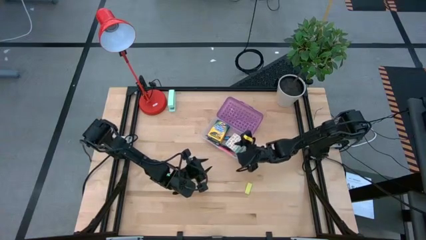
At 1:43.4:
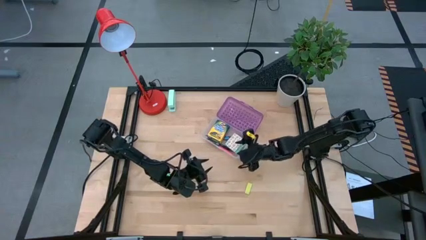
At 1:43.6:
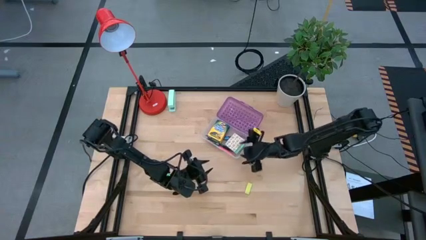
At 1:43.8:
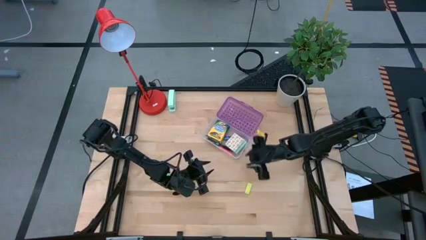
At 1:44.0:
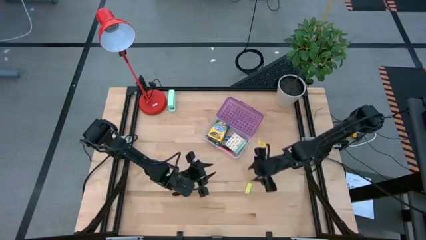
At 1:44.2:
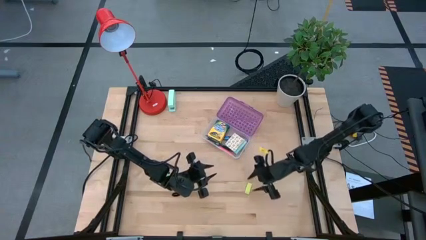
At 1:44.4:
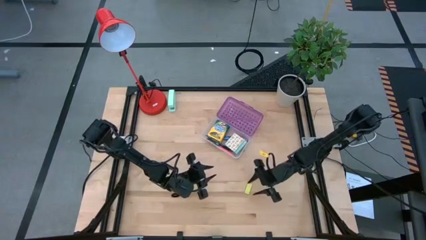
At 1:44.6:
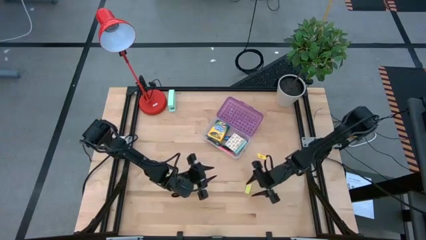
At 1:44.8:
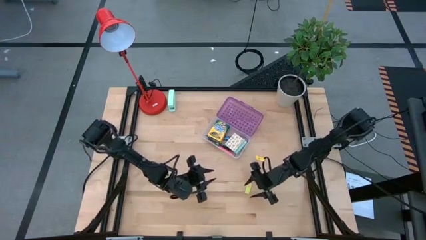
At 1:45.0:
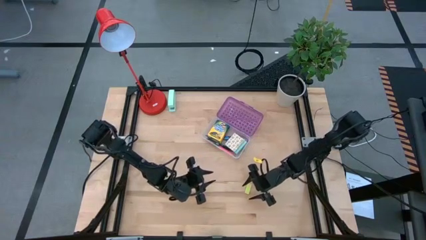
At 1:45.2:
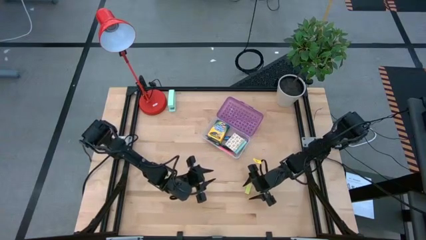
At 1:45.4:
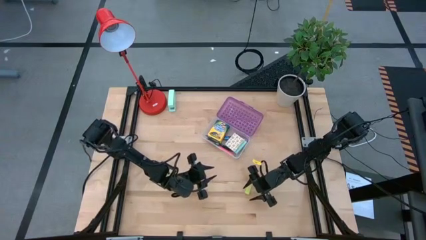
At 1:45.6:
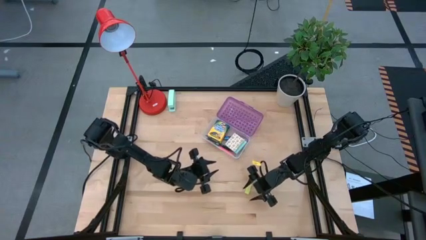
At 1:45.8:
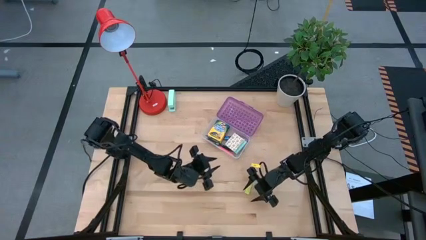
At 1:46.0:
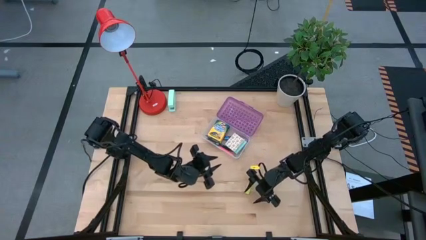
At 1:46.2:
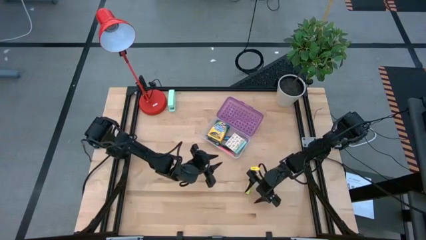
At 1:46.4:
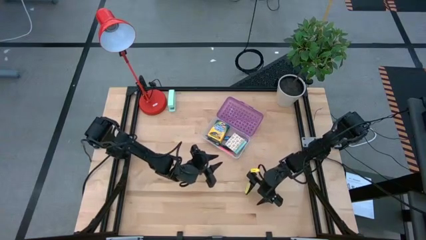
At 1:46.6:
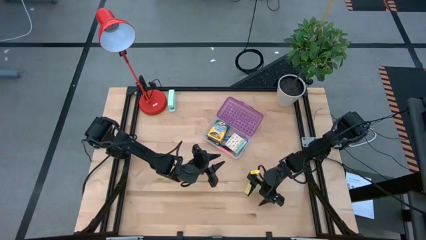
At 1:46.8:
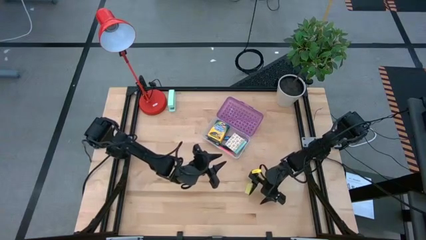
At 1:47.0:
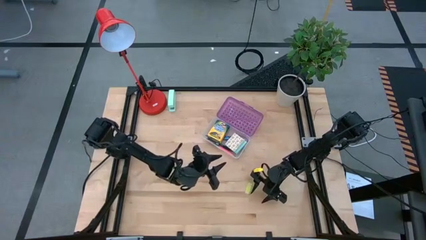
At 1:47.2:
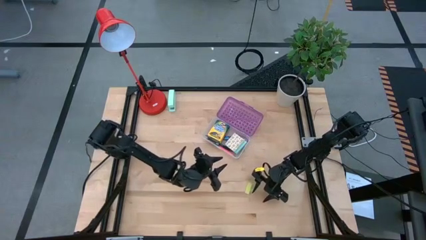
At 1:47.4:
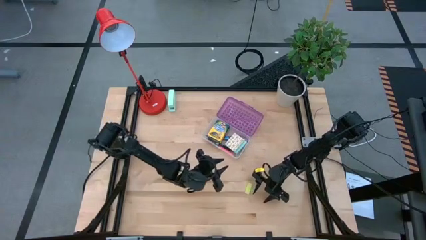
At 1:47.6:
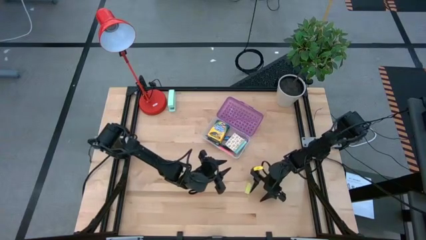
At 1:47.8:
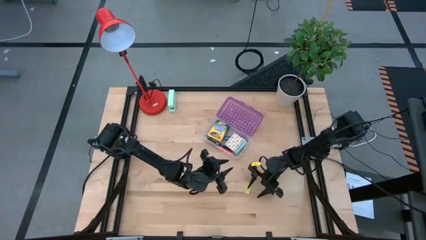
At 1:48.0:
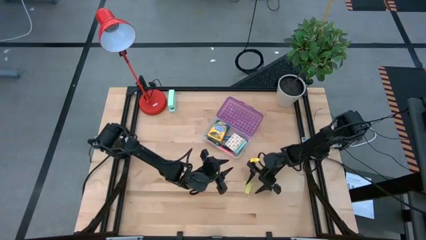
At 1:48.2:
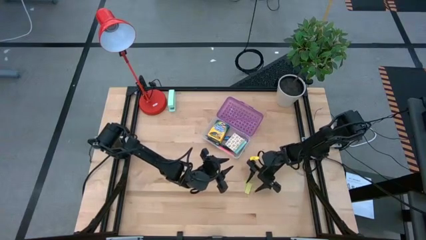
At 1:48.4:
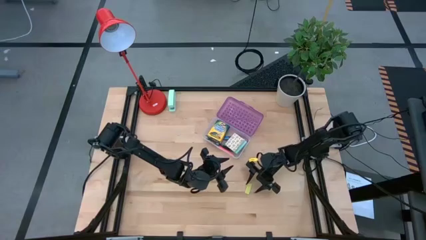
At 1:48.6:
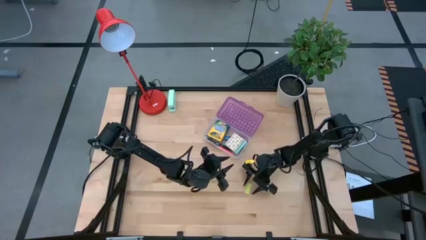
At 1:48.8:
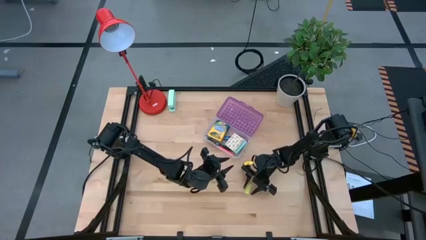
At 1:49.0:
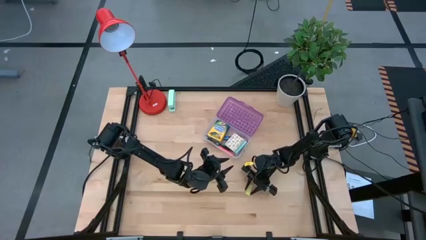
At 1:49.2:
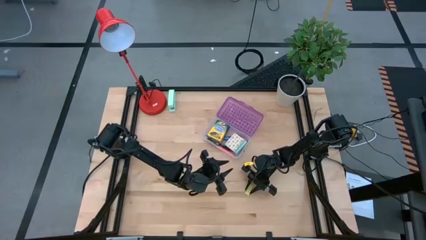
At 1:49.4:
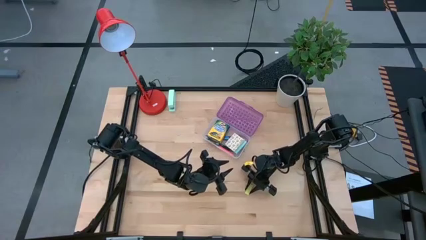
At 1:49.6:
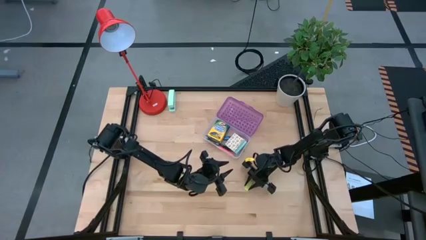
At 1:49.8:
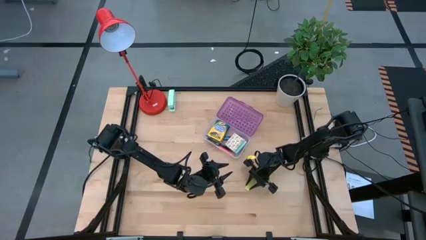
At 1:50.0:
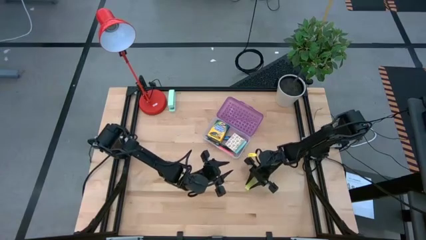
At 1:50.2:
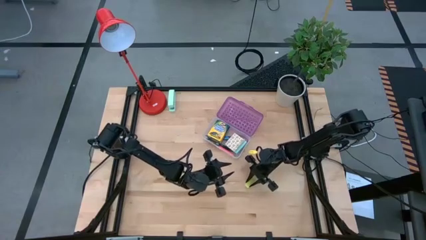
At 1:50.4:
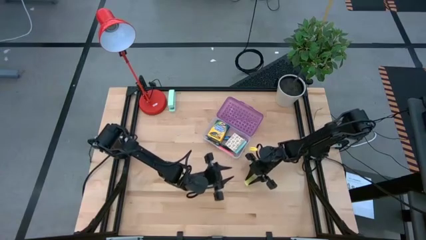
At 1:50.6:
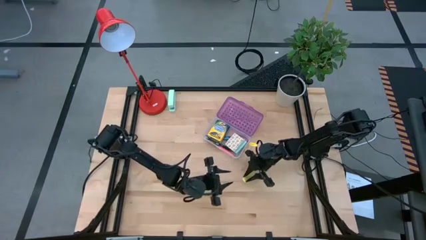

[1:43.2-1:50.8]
Task: Pack school essentials
Put the green eraser into the purple supply box

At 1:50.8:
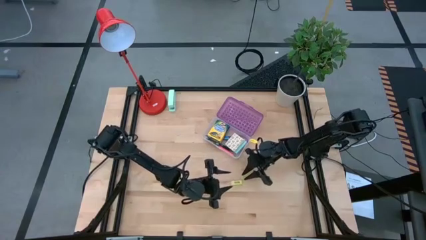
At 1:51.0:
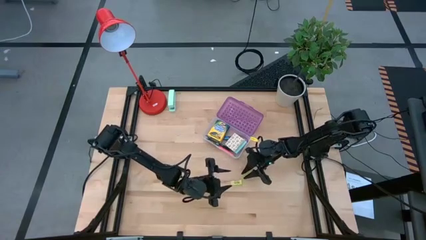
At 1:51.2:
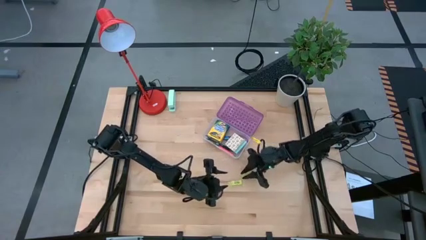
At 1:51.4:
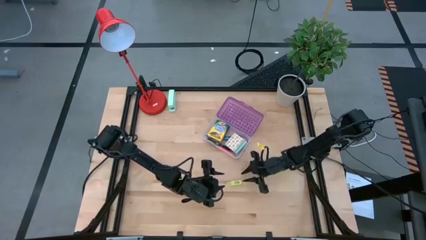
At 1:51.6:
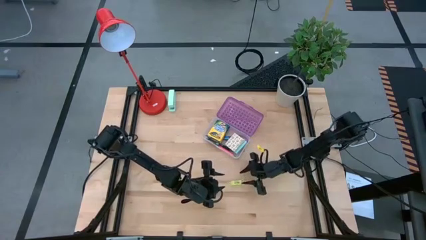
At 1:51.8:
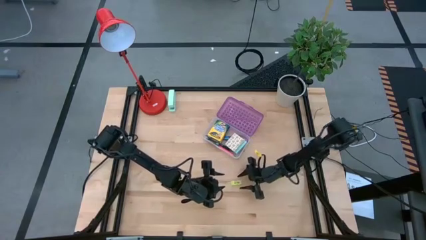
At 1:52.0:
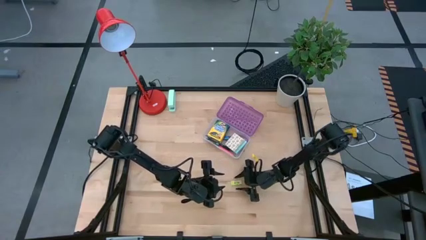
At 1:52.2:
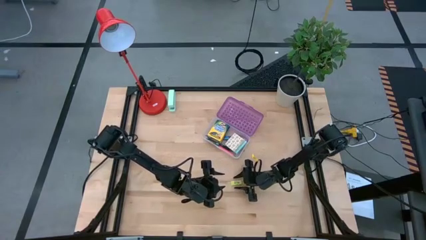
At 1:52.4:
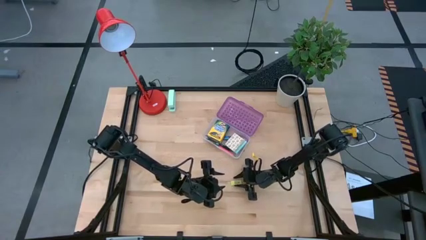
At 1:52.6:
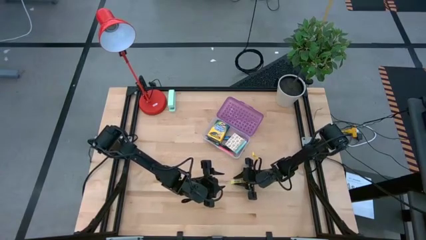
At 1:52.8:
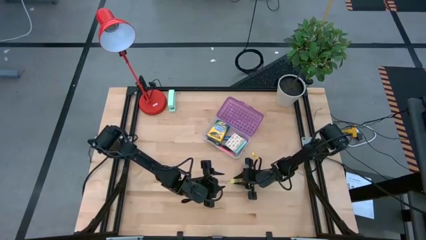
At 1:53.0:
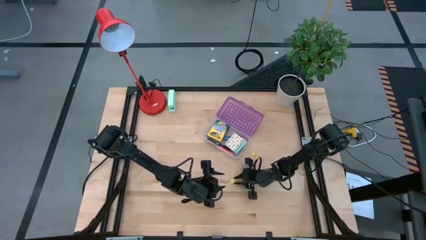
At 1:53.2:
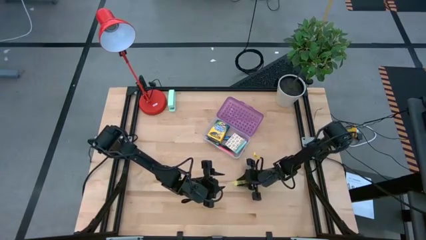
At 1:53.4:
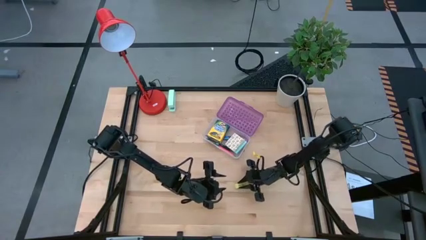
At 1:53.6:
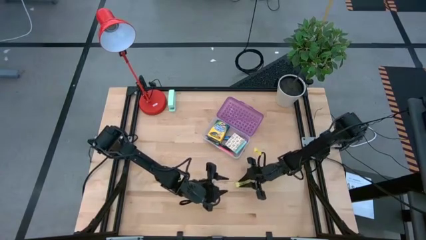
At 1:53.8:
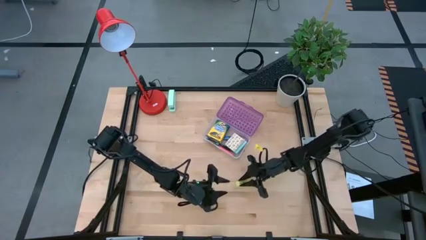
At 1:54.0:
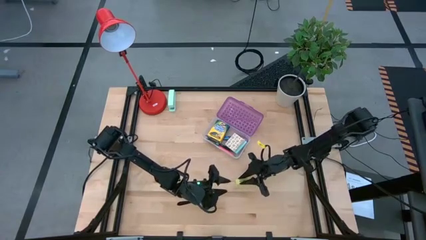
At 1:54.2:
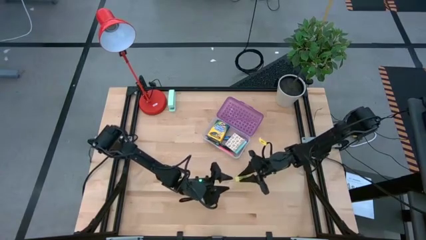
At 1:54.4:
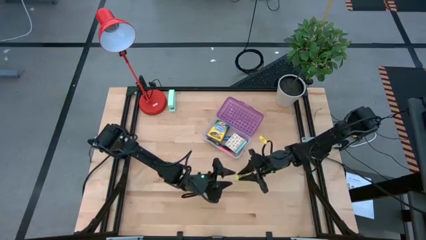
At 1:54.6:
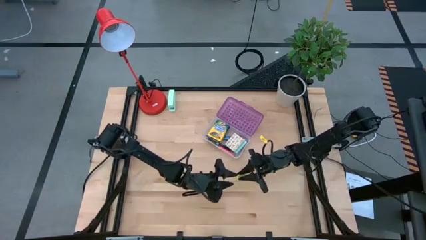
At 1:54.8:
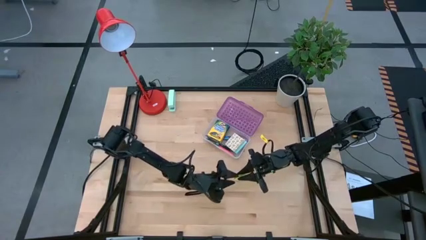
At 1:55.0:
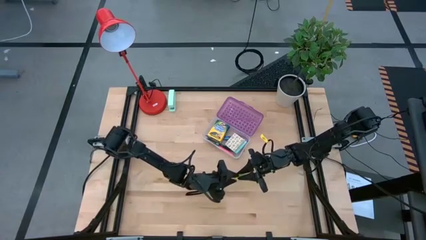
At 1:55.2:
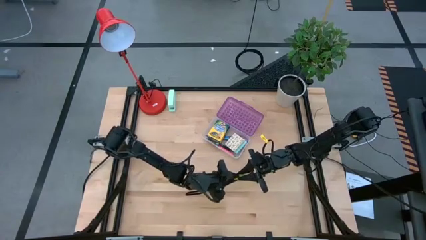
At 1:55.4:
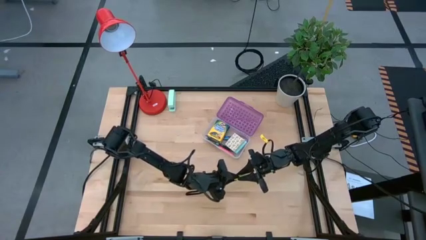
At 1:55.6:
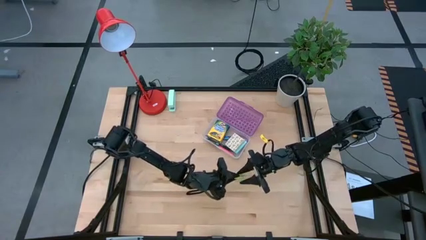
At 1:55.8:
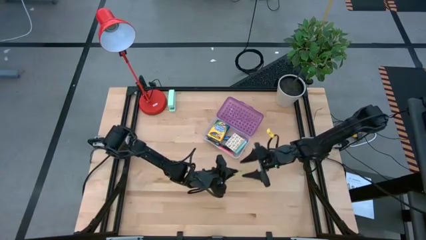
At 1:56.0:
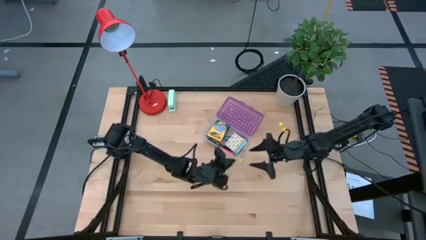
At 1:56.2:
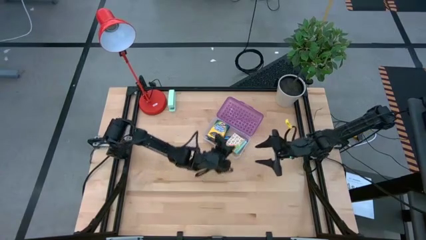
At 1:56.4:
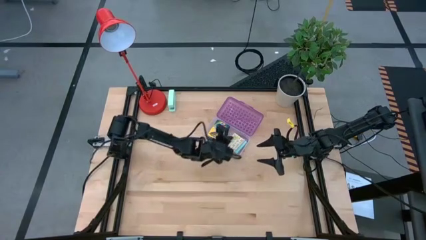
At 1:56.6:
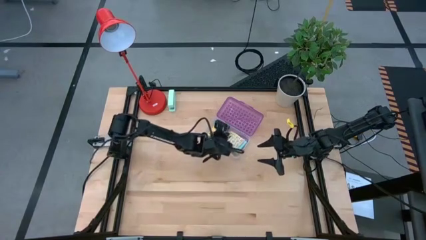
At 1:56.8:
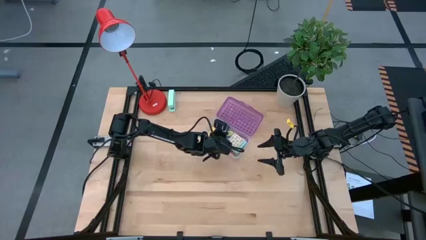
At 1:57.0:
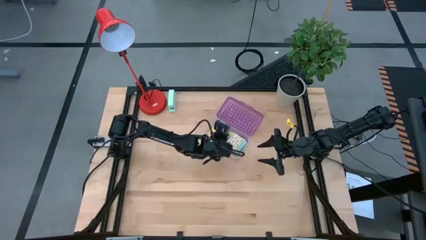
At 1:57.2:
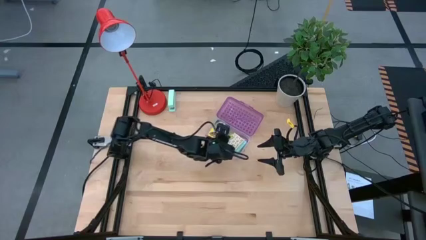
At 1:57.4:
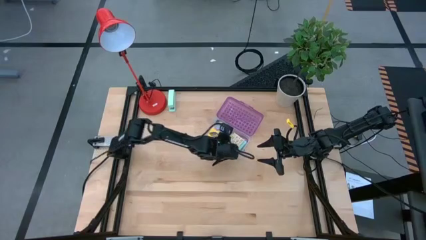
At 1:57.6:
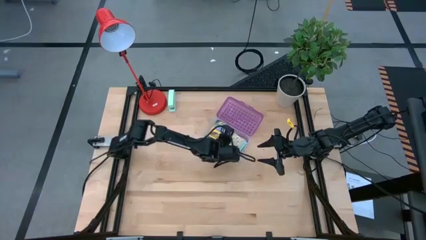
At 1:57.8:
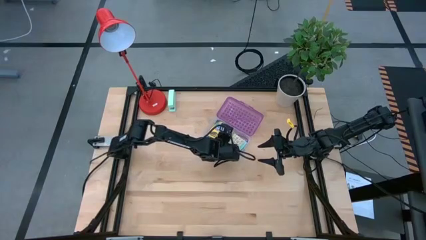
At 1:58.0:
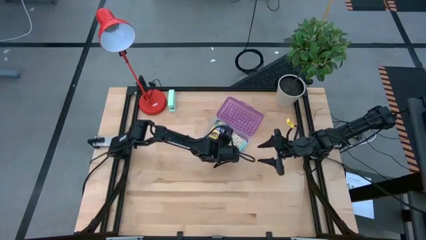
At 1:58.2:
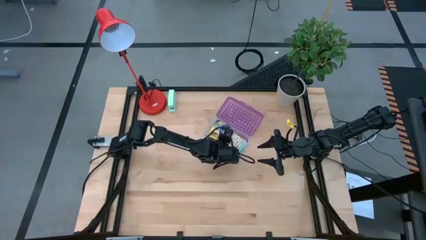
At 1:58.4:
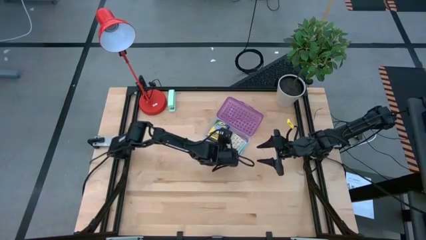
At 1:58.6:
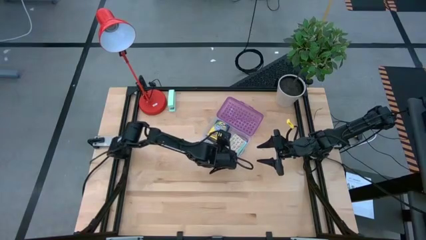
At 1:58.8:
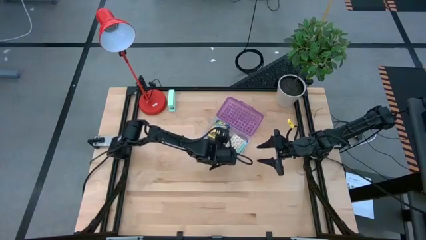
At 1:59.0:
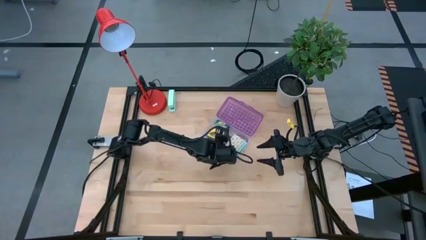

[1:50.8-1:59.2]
Put the green eraser into the purple supply box
